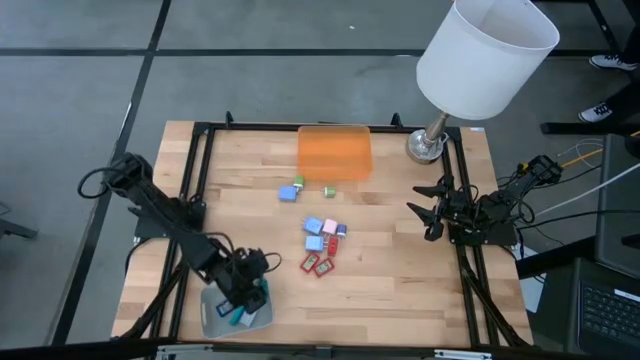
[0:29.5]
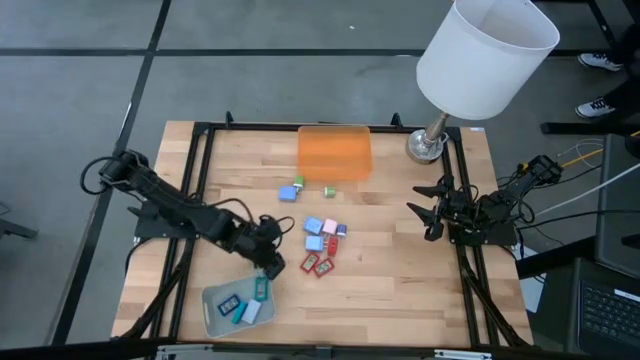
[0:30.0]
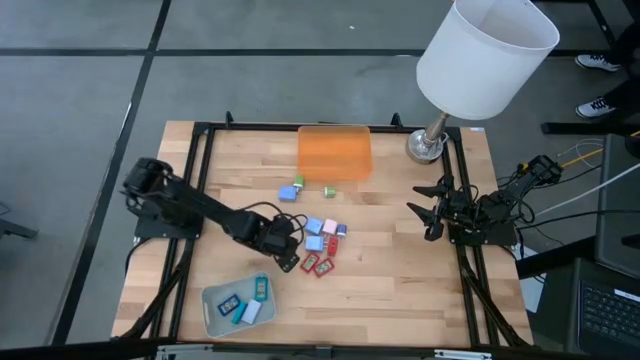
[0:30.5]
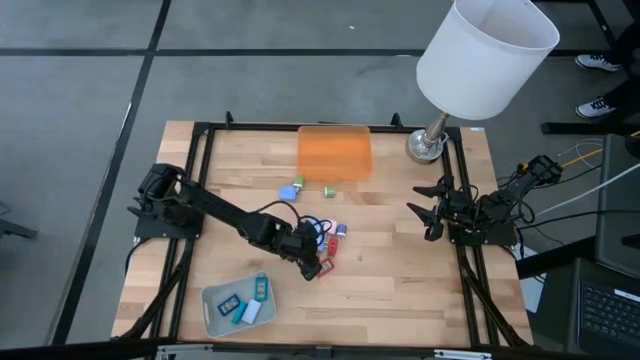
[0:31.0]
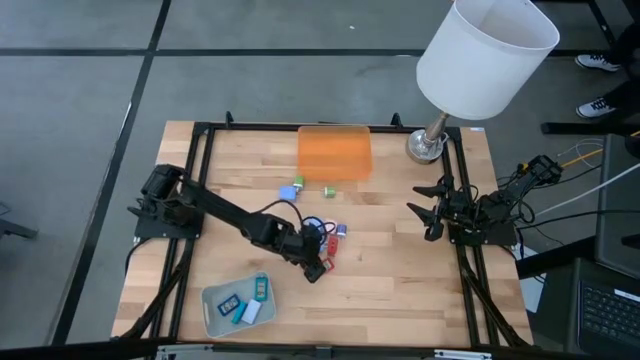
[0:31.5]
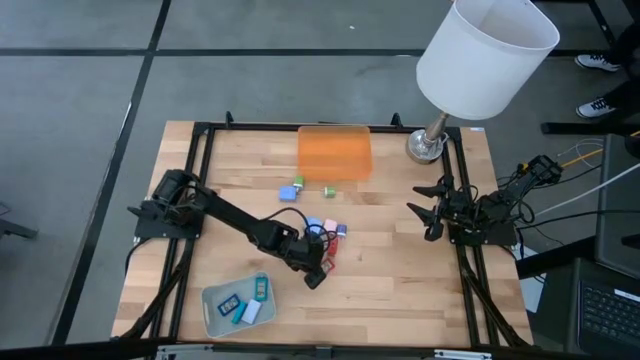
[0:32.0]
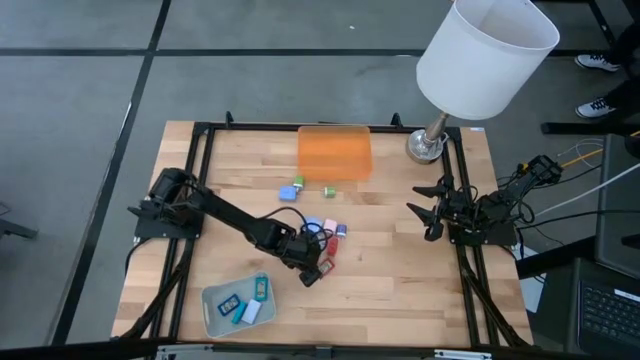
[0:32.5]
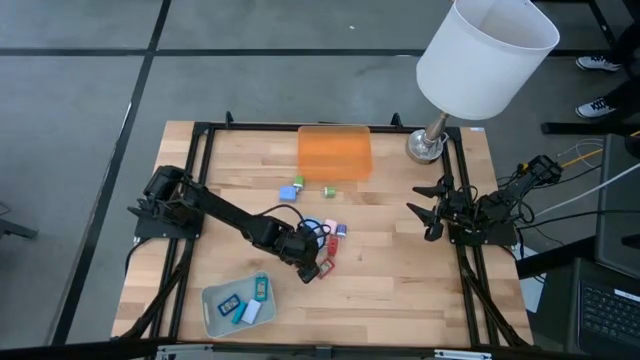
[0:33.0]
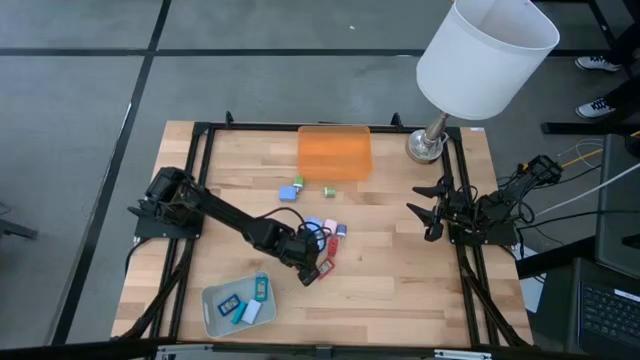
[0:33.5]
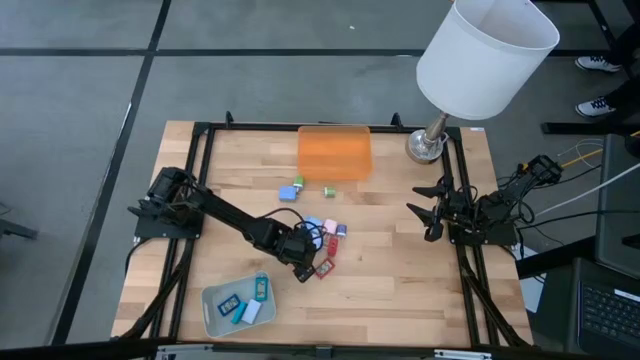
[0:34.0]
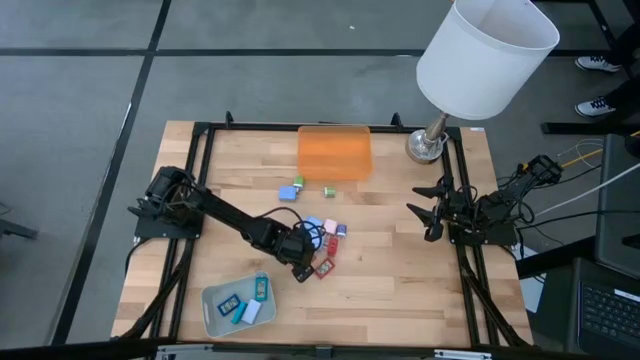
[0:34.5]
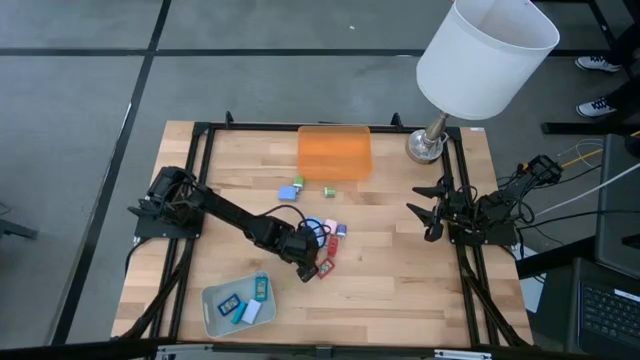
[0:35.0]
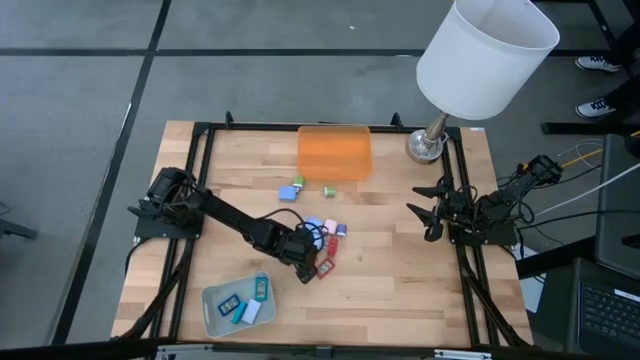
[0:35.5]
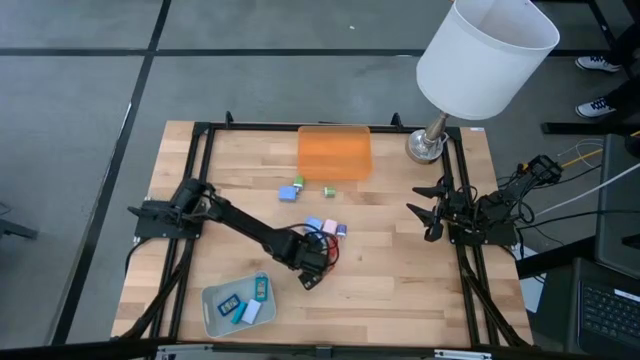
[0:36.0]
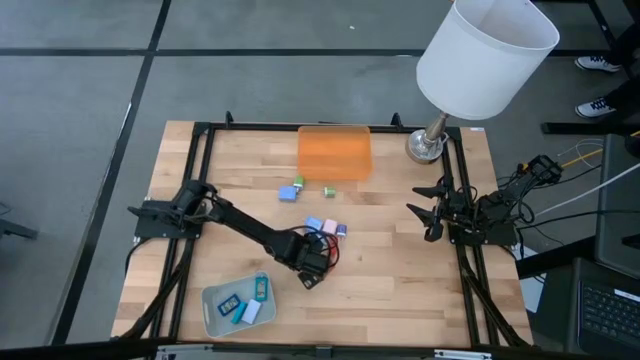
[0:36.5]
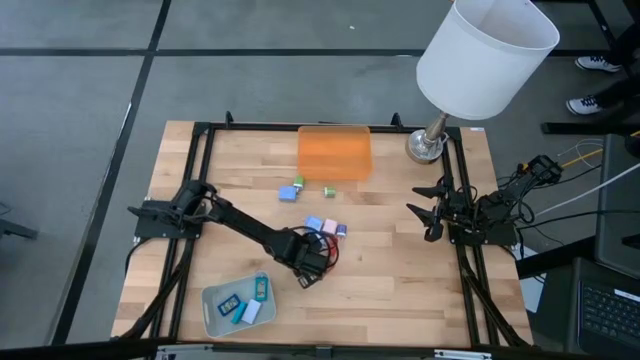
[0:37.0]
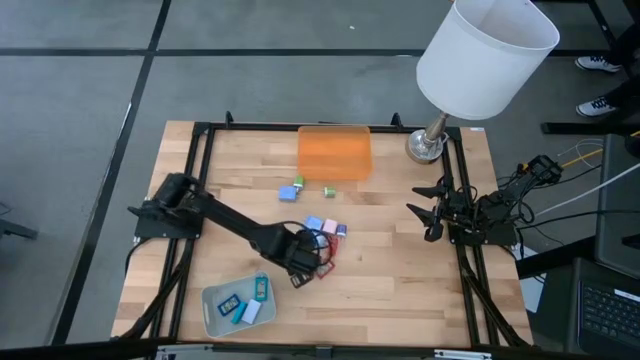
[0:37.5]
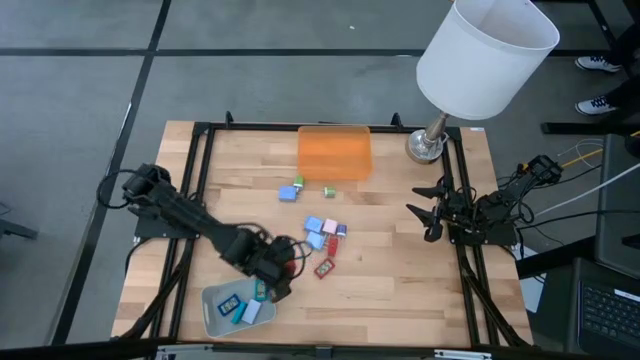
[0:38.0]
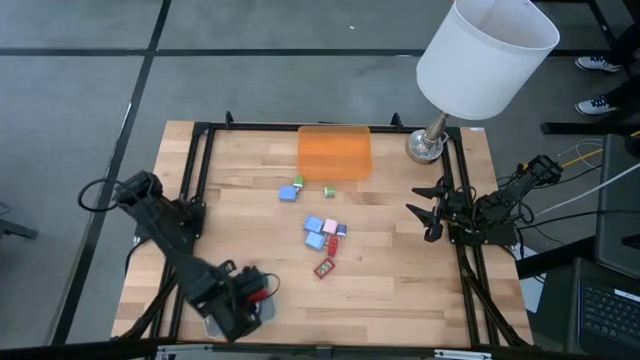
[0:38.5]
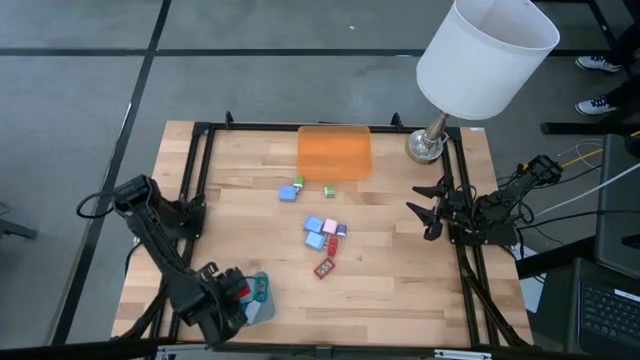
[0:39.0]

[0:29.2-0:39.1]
Task: Pick & Place Office items
Put the left red digital timer into the gray bin

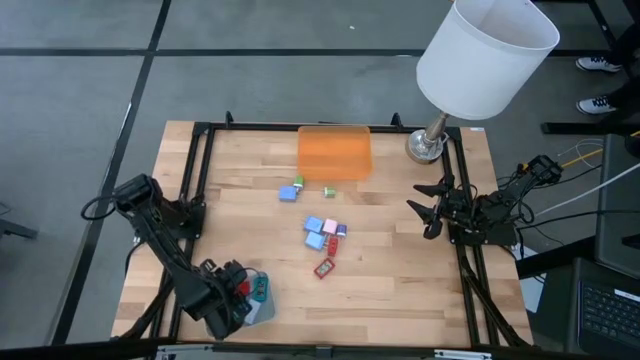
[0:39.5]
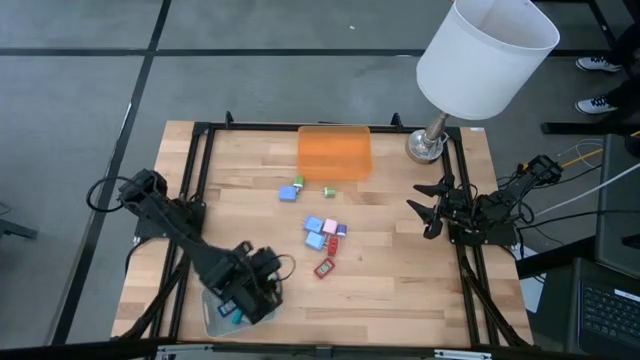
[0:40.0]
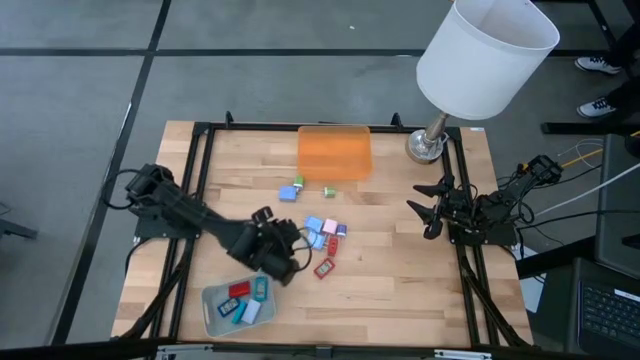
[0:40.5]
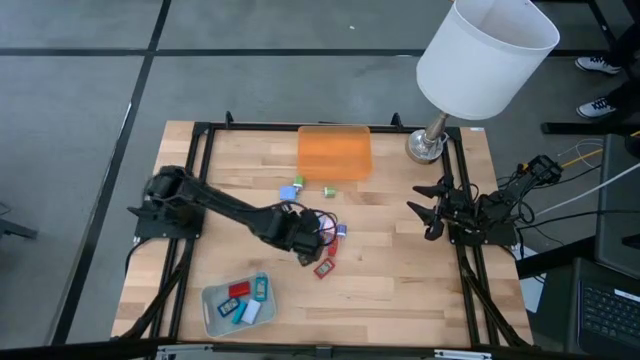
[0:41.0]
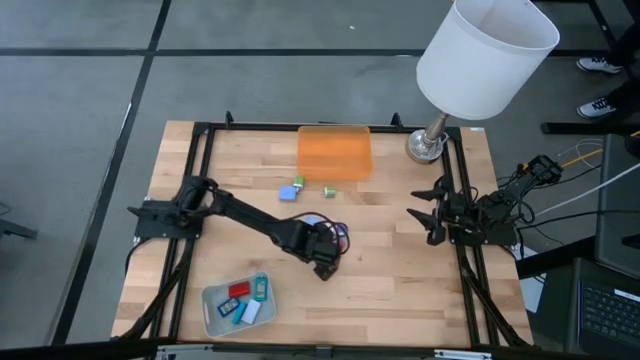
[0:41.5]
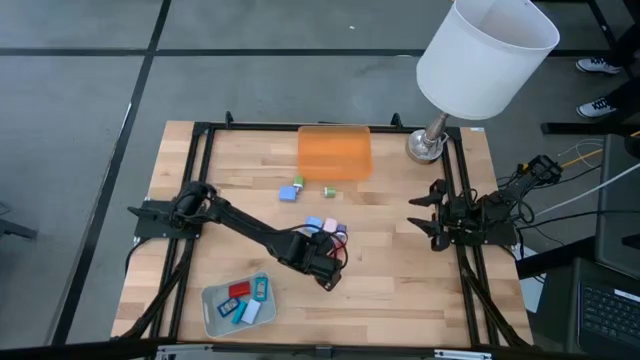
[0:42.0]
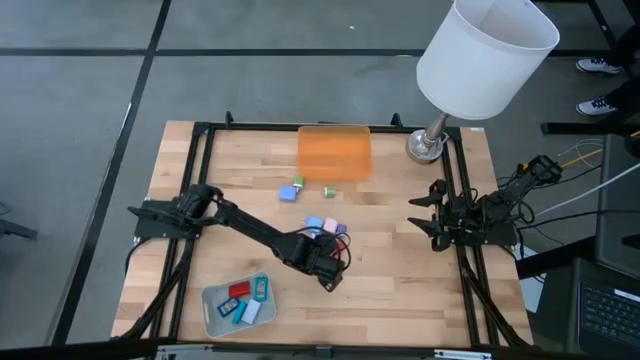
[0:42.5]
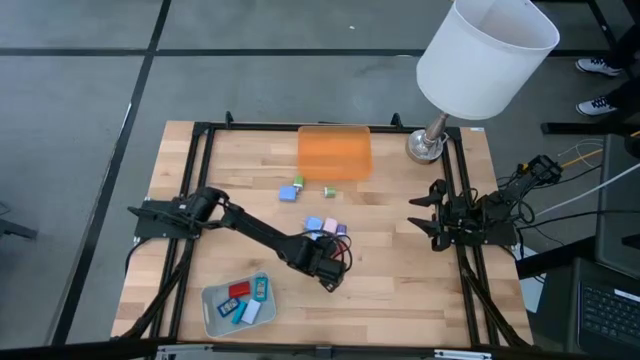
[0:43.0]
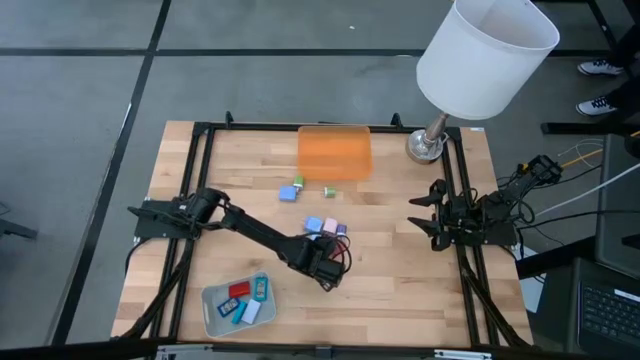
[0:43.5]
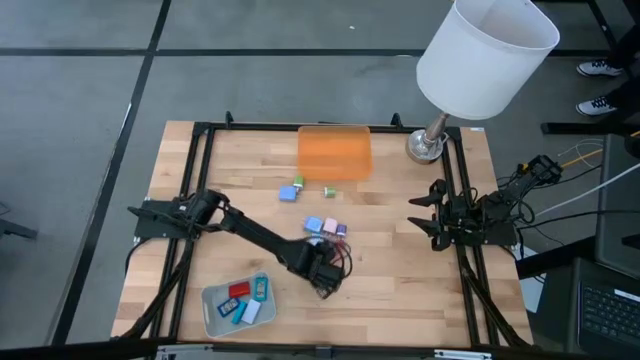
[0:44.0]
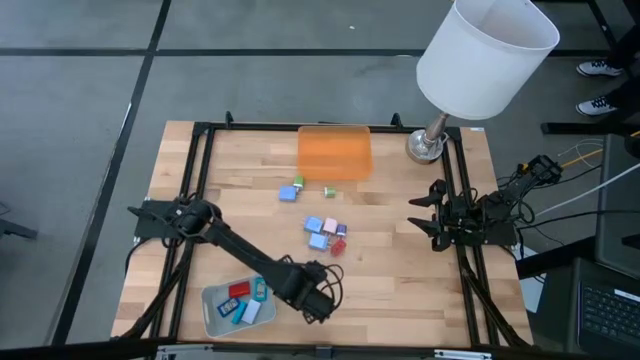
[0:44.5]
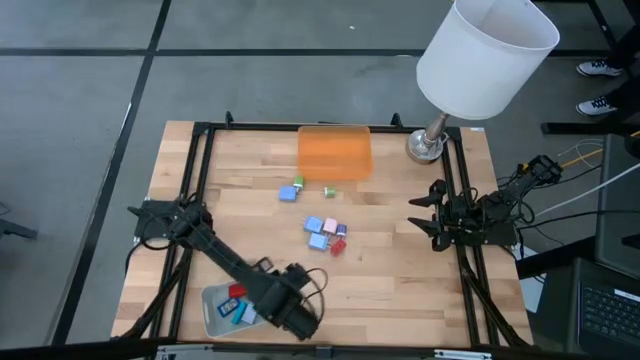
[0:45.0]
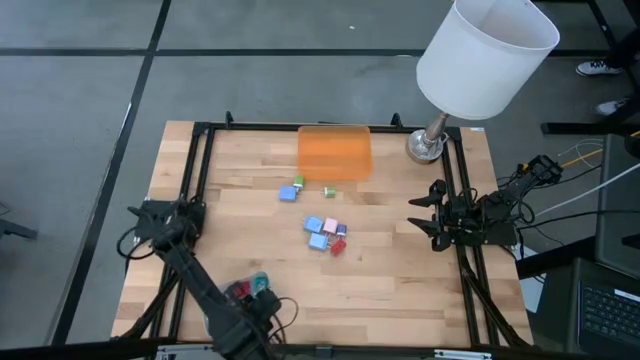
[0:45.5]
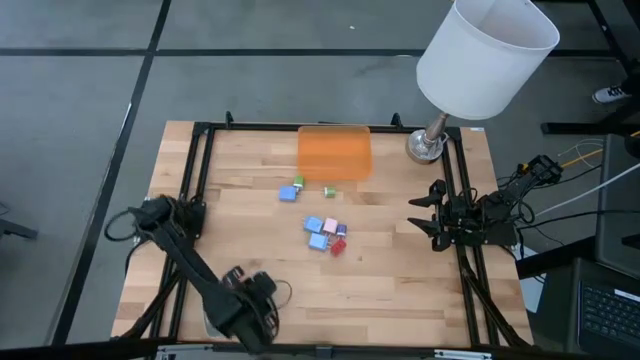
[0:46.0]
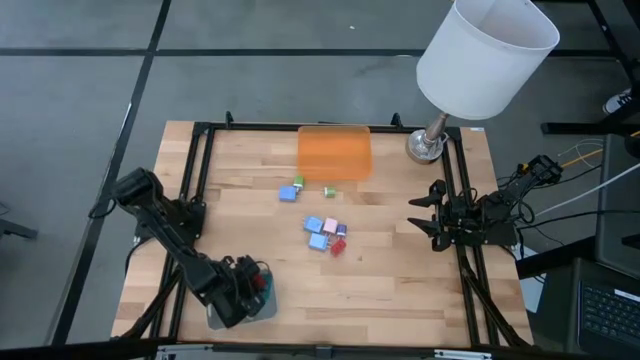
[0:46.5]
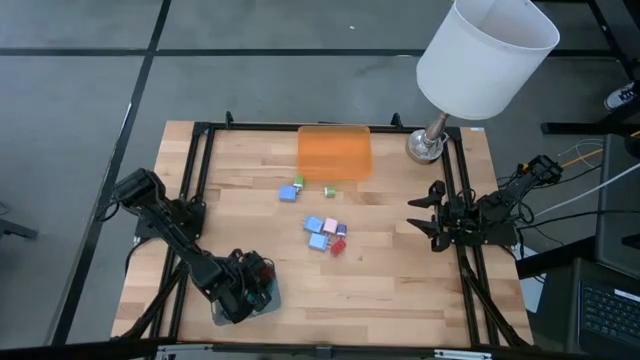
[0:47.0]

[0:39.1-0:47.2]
Put the red digital timer into the gray bin

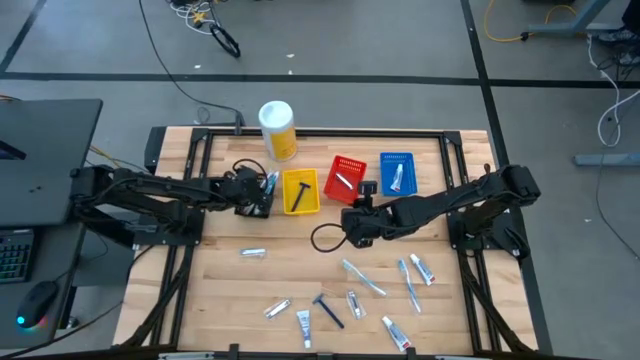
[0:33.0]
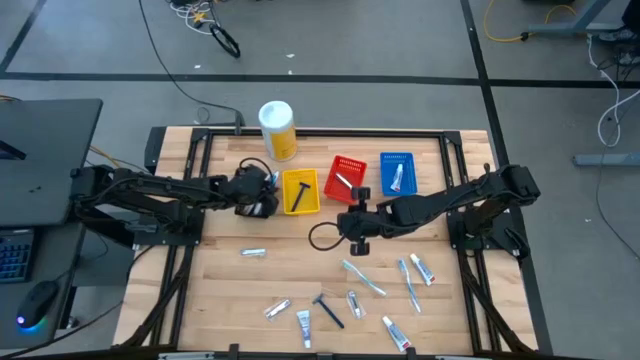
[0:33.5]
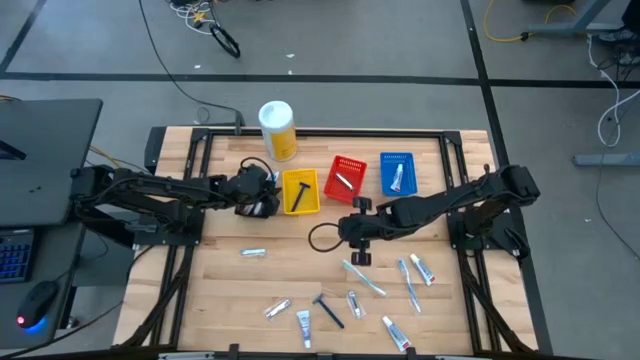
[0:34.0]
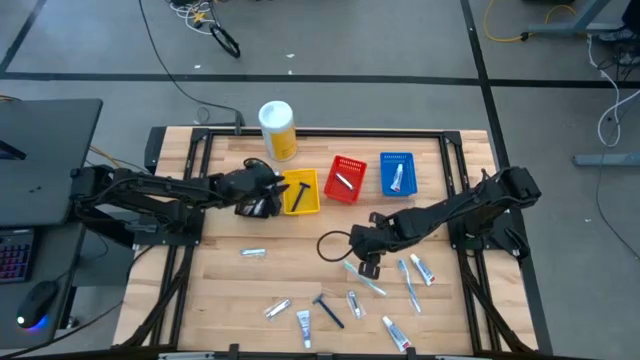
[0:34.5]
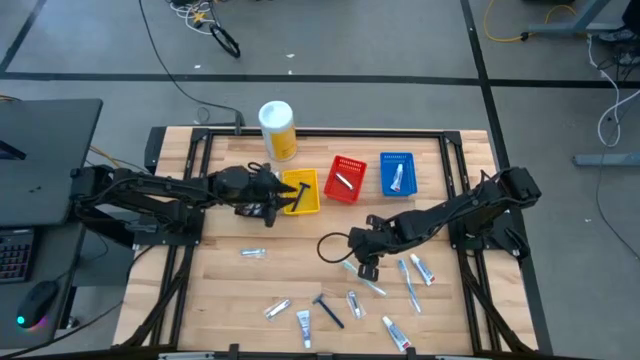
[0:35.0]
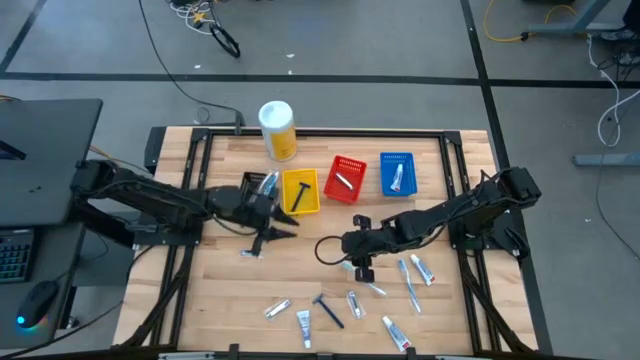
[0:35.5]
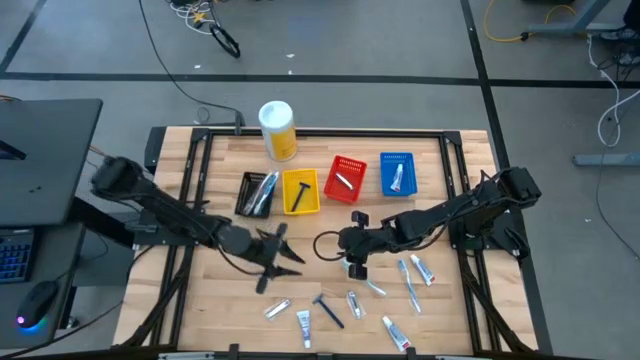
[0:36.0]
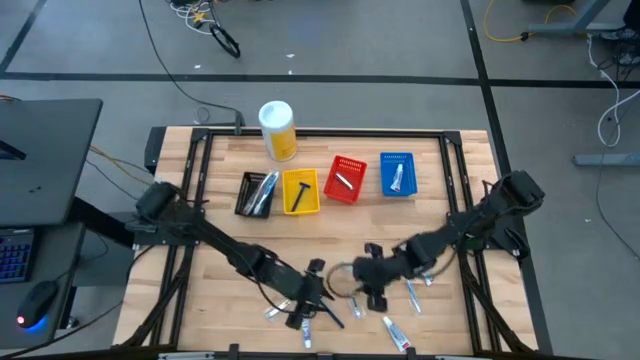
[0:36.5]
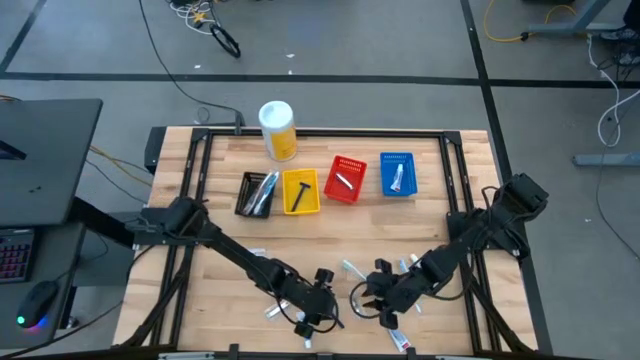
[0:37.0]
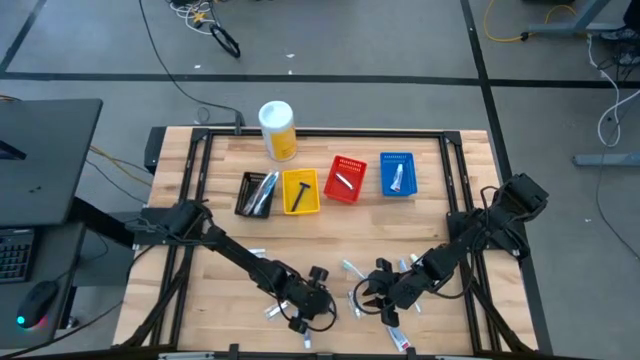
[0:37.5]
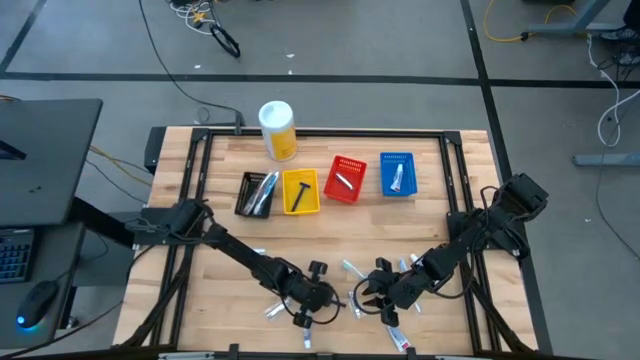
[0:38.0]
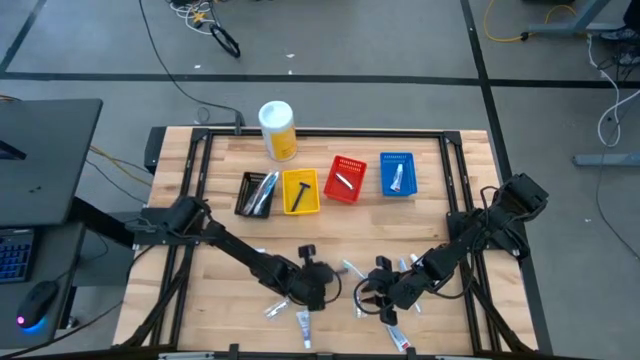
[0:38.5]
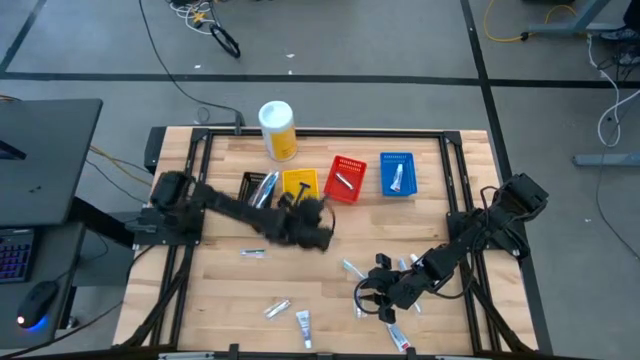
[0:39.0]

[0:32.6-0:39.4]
Task: Pick & Place Travel size toiletries
Put the blue razor into the yellow bin
